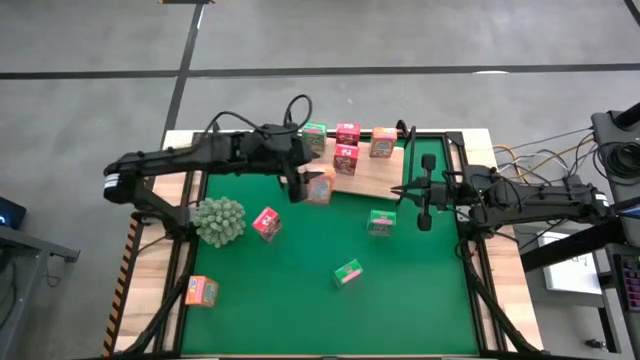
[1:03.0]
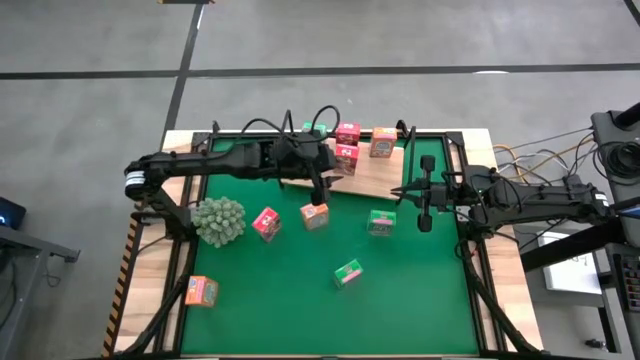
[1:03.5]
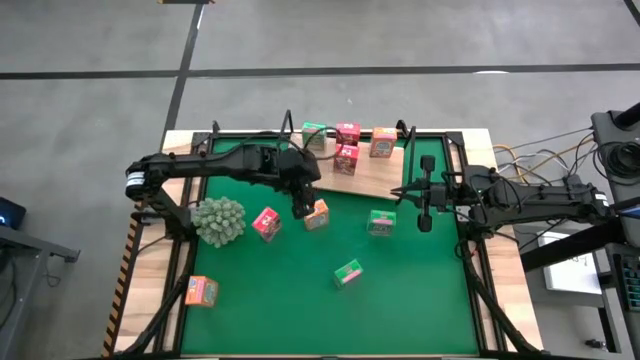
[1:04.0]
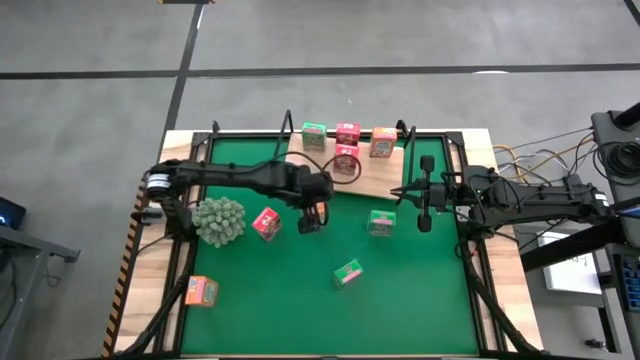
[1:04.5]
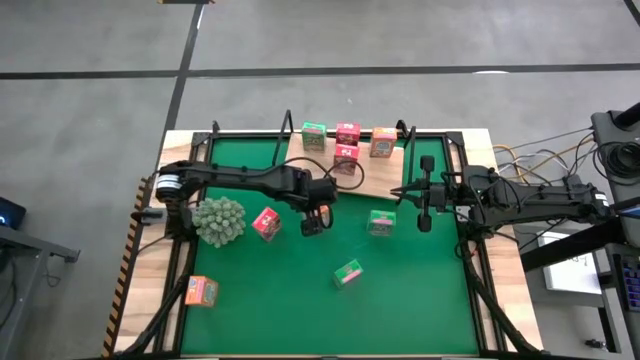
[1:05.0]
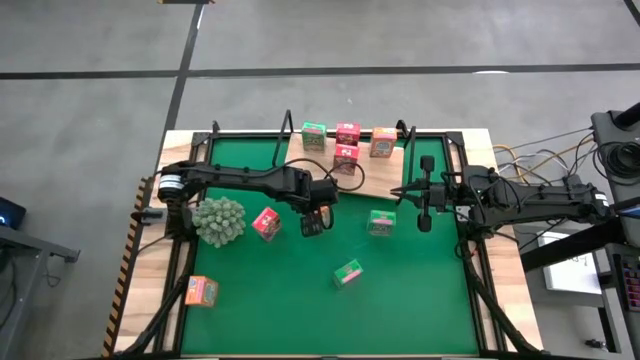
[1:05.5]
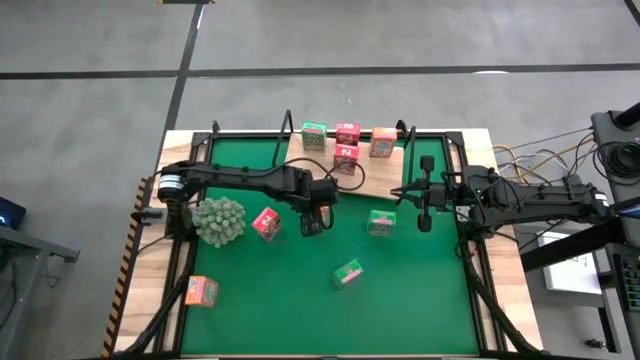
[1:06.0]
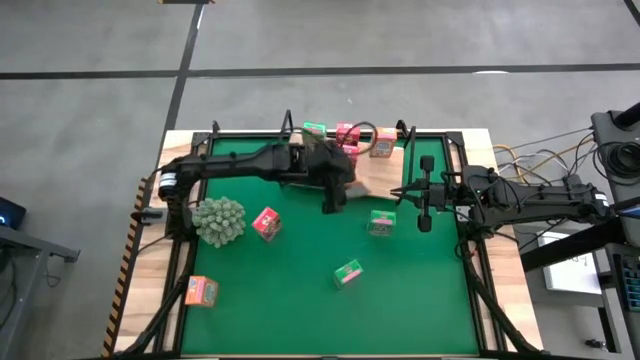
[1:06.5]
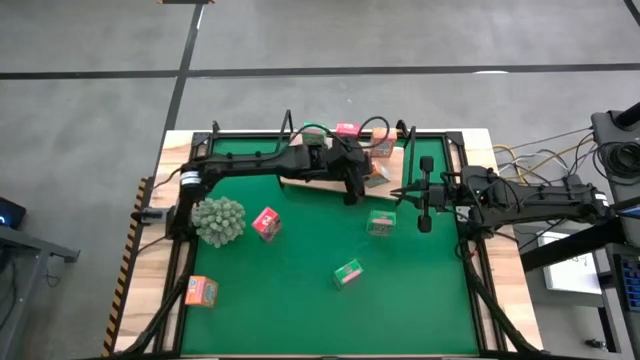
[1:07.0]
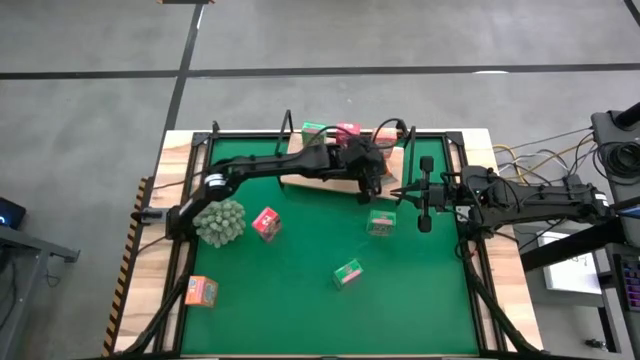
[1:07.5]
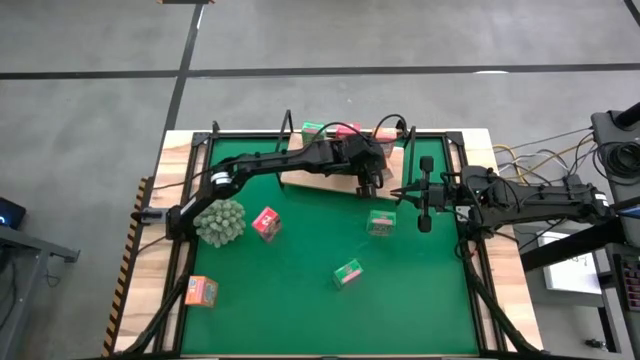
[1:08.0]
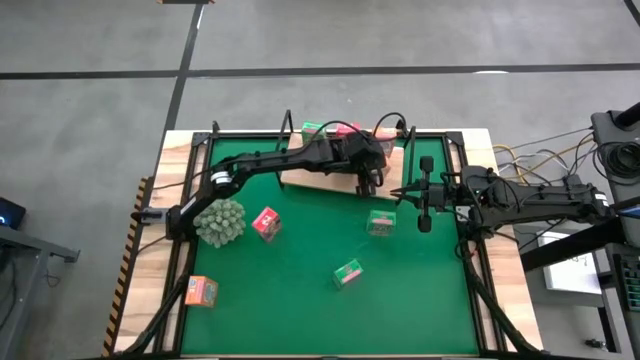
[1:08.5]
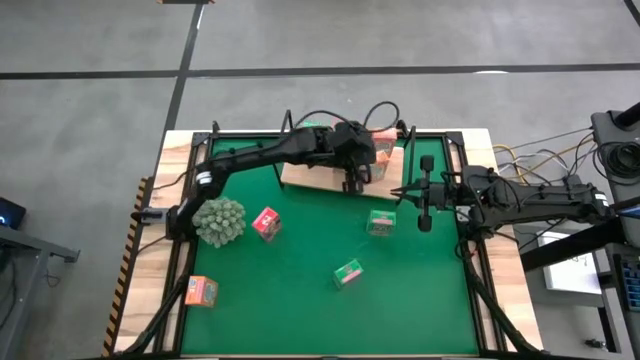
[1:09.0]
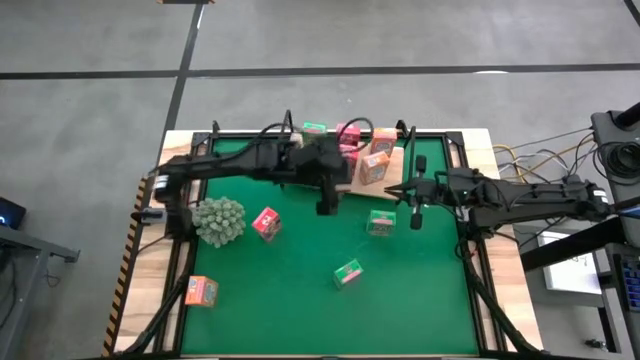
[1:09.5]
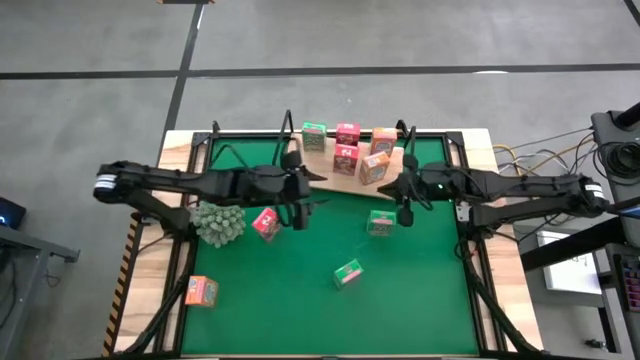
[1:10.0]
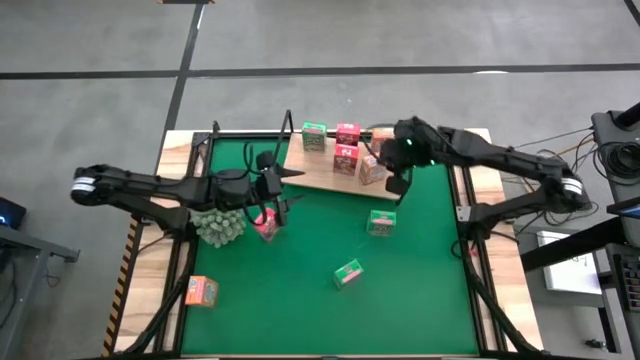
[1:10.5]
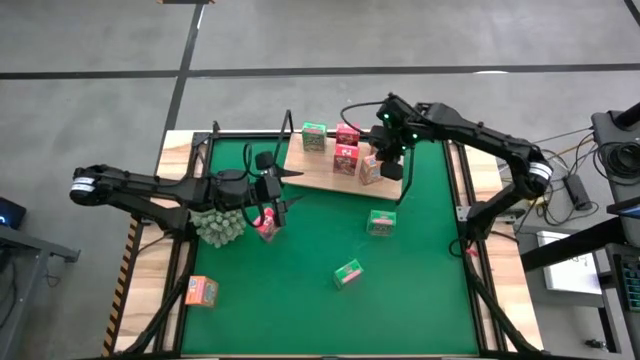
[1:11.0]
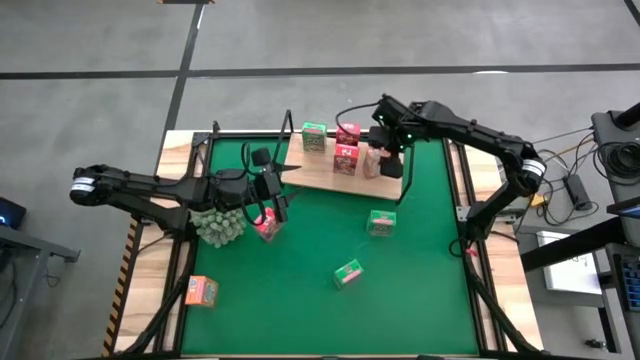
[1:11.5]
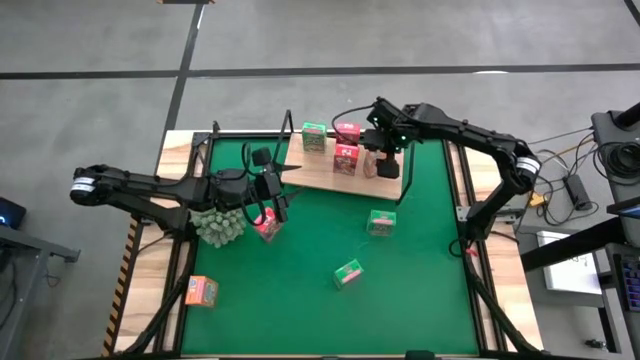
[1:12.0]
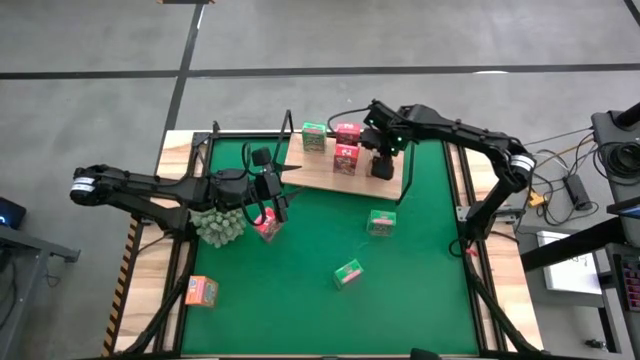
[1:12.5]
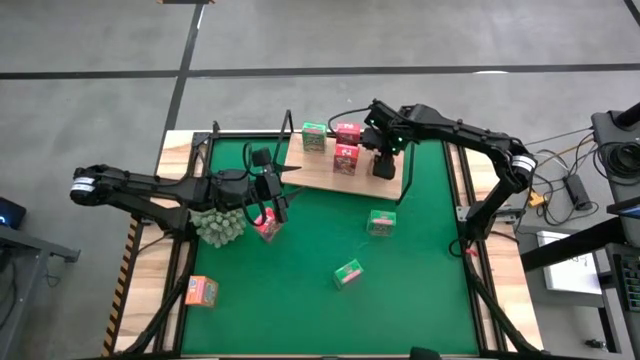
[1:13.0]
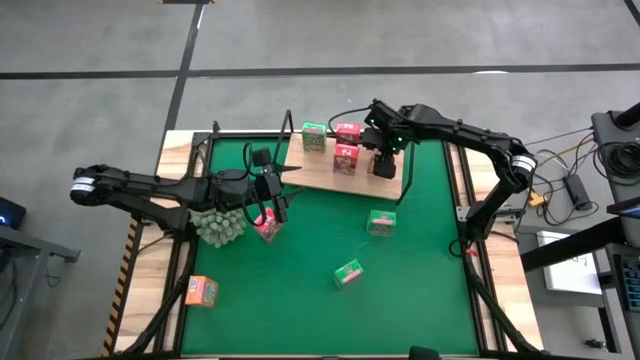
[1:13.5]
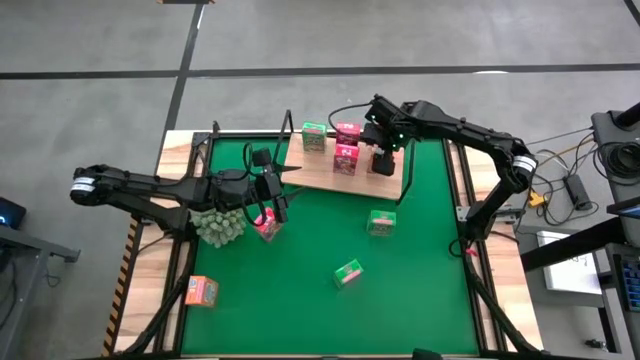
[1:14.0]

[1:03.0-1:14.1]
Task: Stack cereal on shelf
Put the top orange cereal box on the shelf aligned with the other orange cereal box

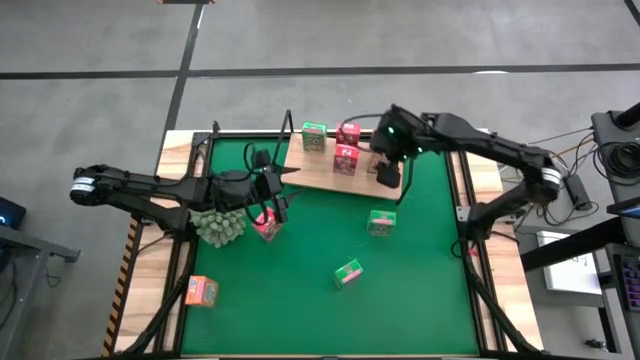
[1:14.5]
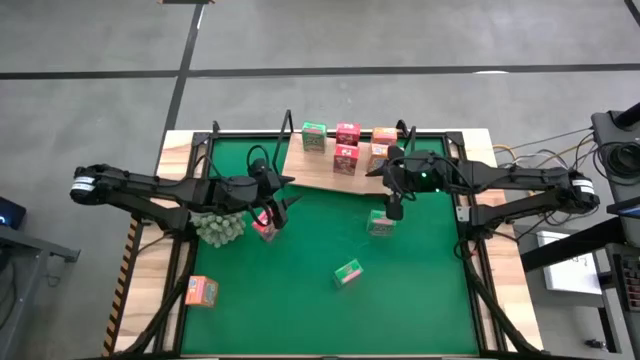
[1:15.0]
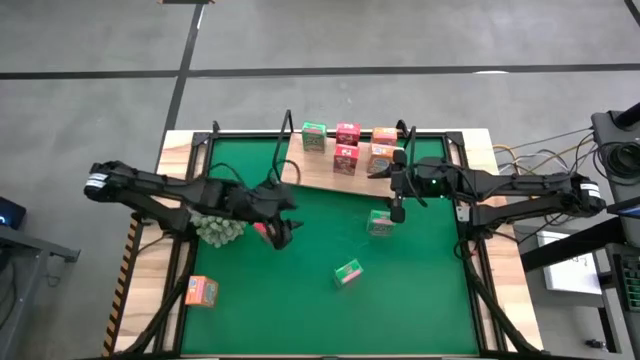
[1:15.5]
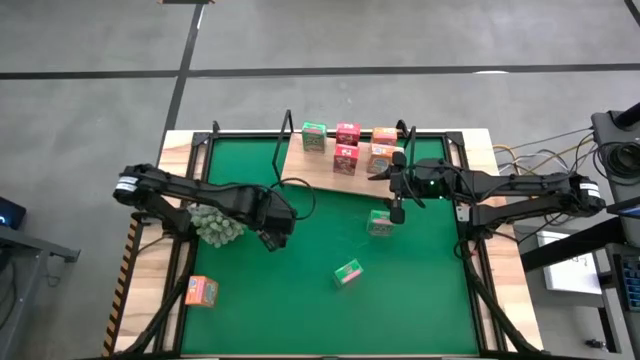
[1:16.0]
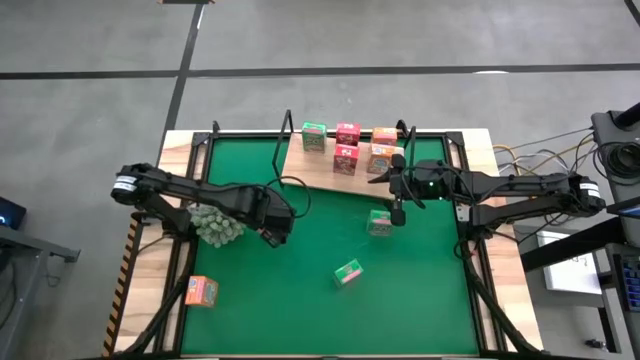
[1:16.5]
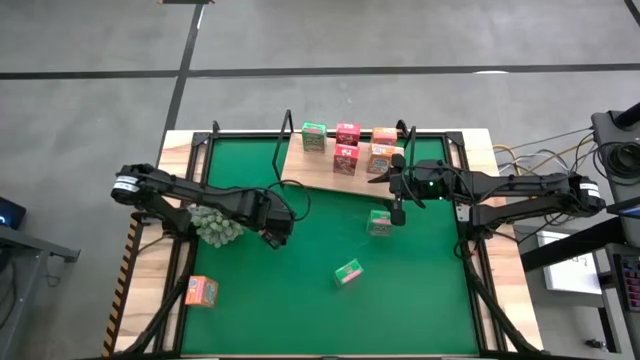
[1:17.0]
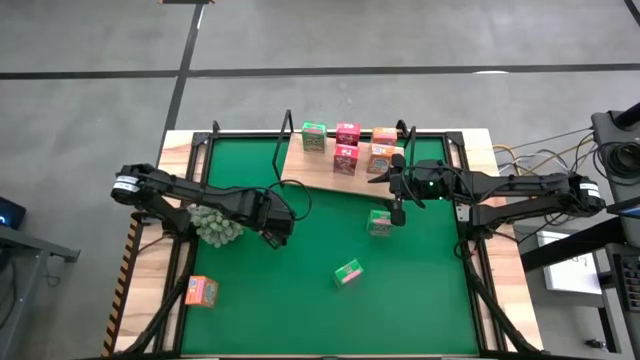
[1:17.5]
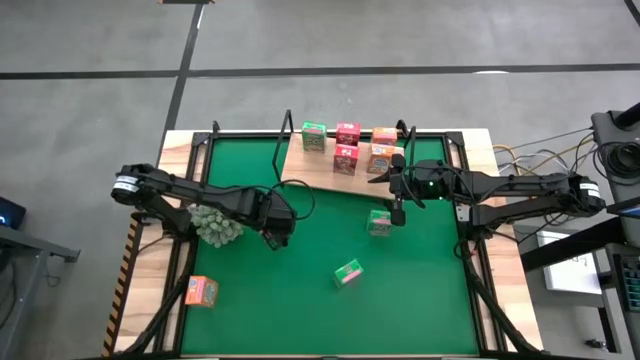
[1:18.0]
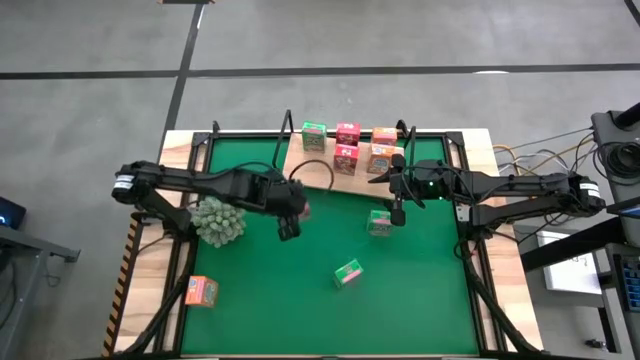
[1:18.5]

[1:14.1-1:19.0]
Put the red cereal box on the shelf aligned with the other red cereal box

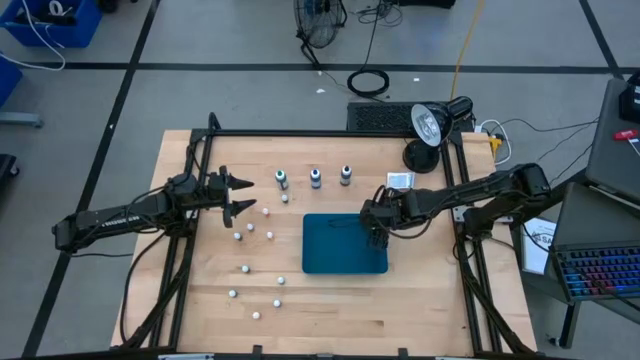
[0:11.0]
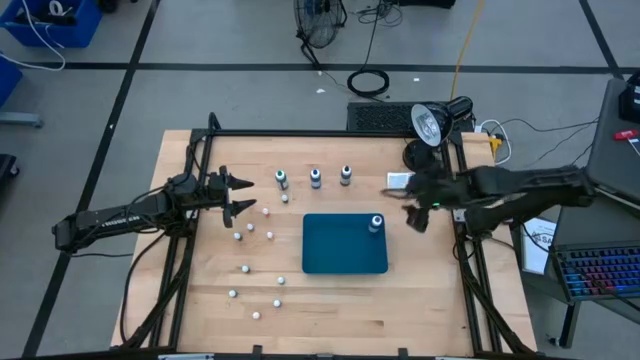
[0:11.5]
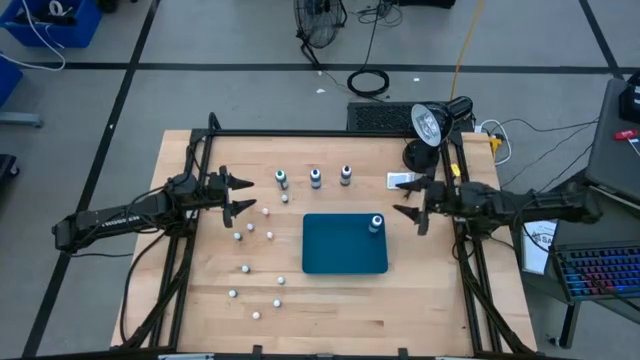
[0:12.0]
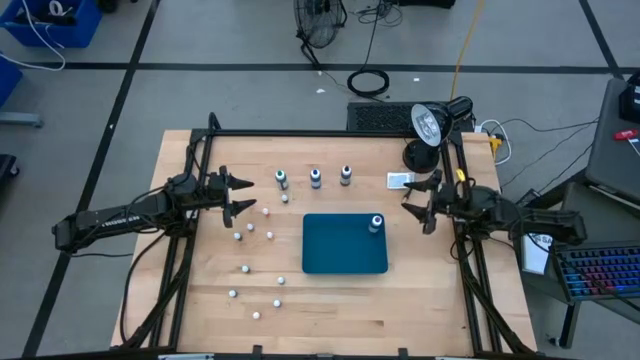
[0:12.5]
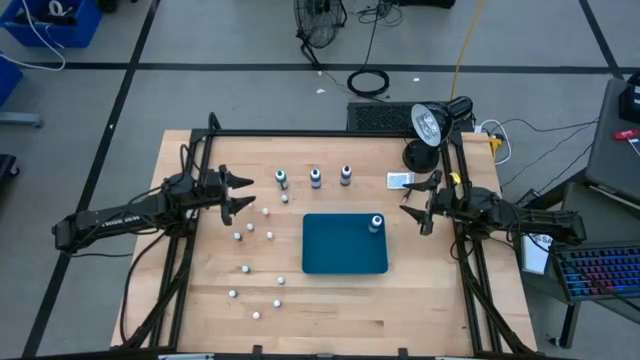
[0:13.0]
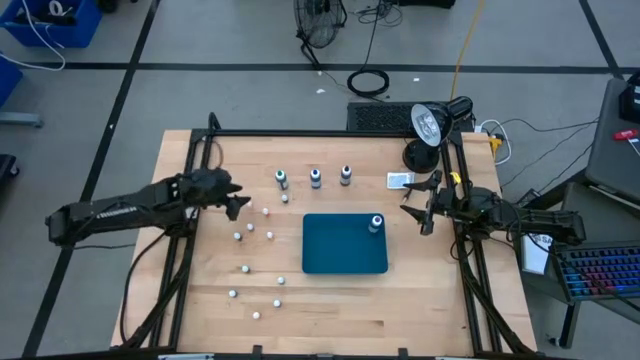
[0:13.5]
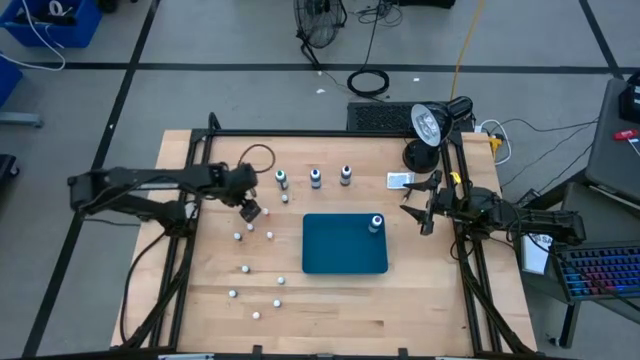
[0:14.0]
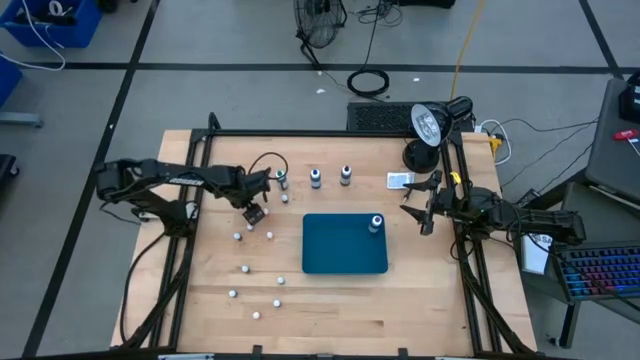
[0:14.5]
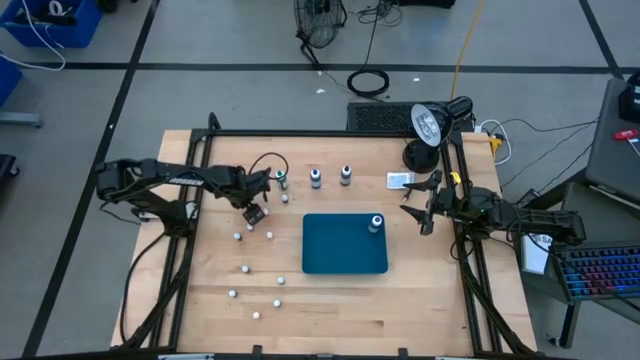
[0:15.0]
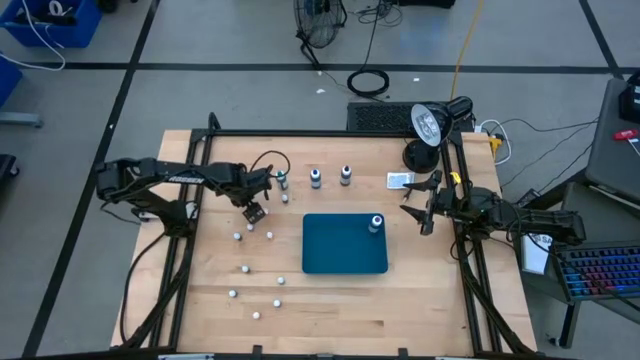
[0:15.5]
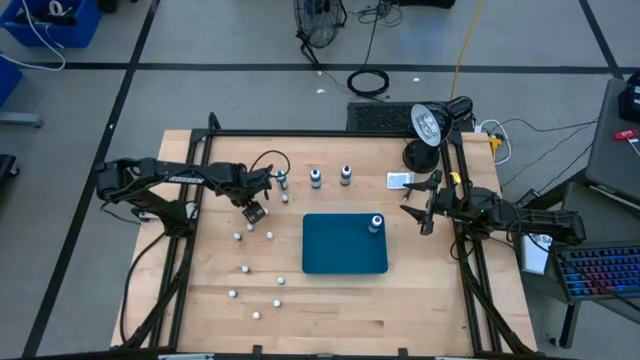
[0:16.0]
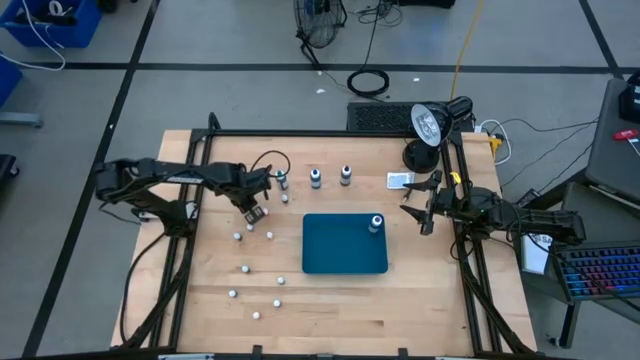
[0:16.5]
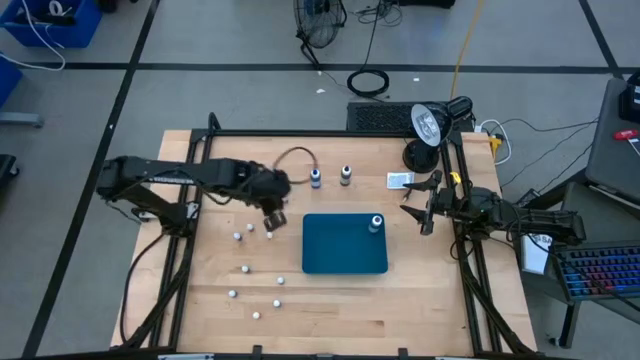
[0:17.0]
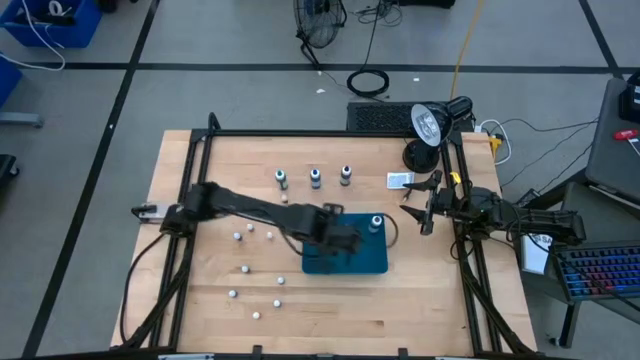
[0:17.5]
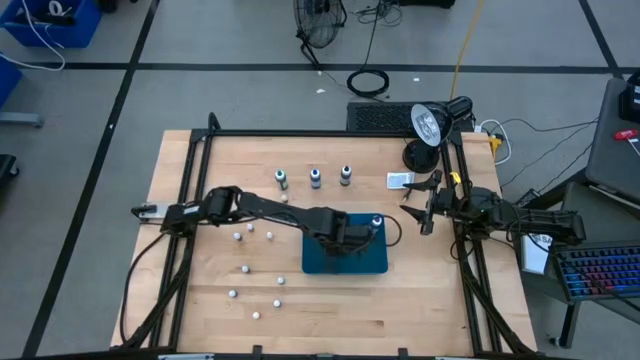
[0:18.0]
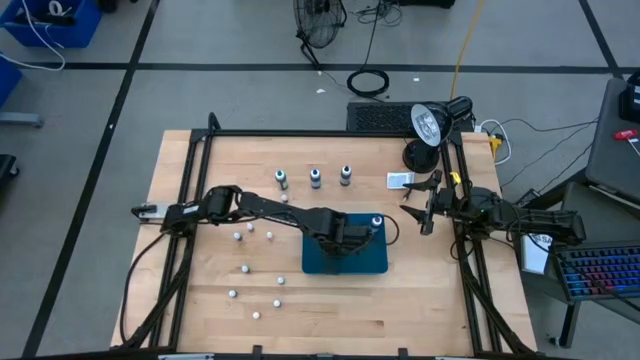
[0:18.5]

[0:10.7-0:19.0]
Task: Pick & Place food coloring
Put the small orange food coloring bottle into the blue bin
